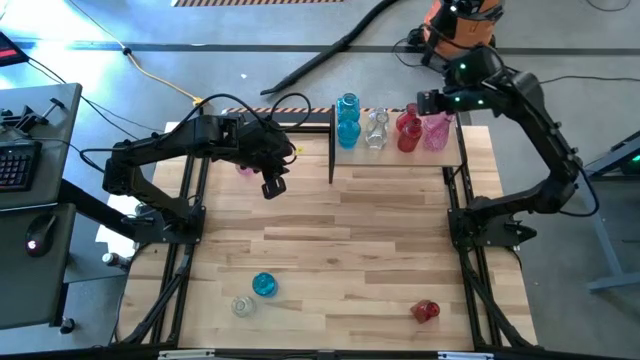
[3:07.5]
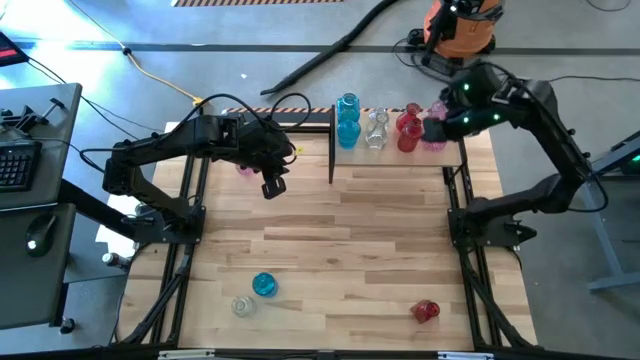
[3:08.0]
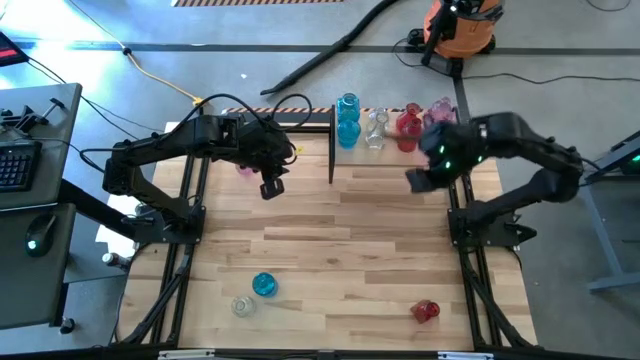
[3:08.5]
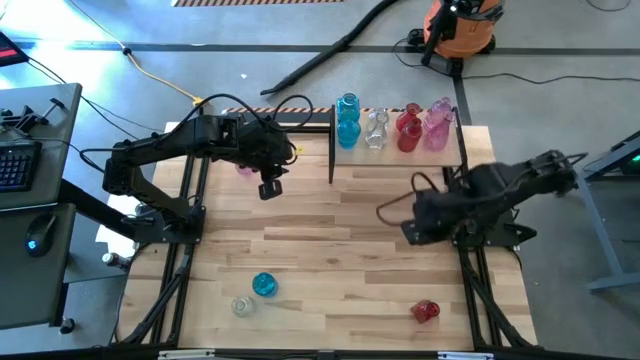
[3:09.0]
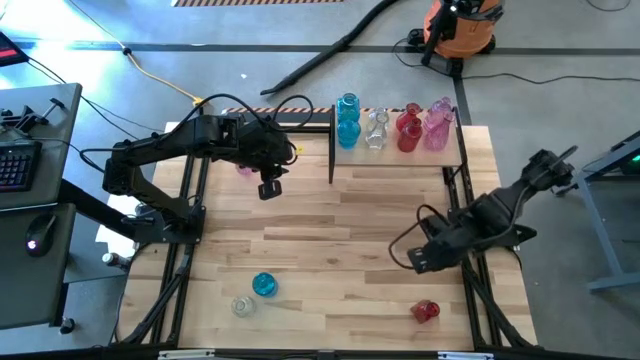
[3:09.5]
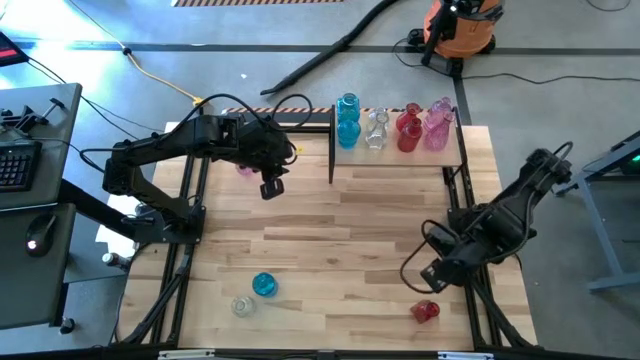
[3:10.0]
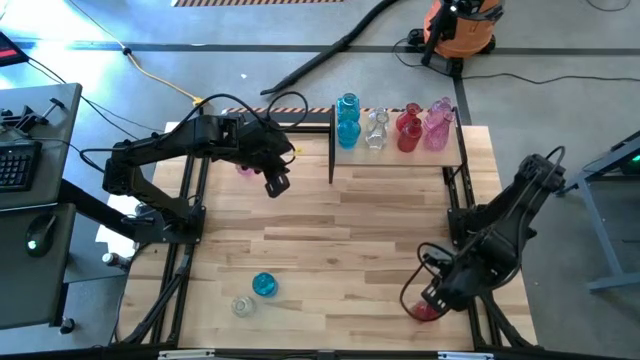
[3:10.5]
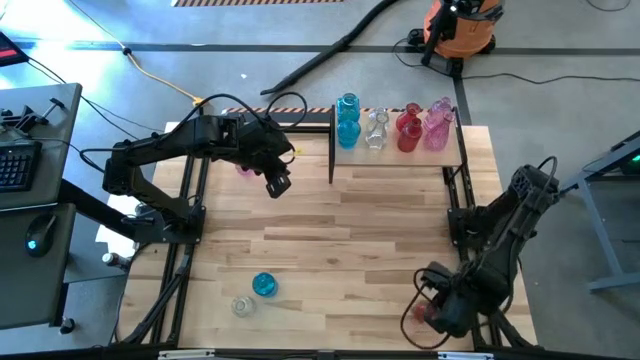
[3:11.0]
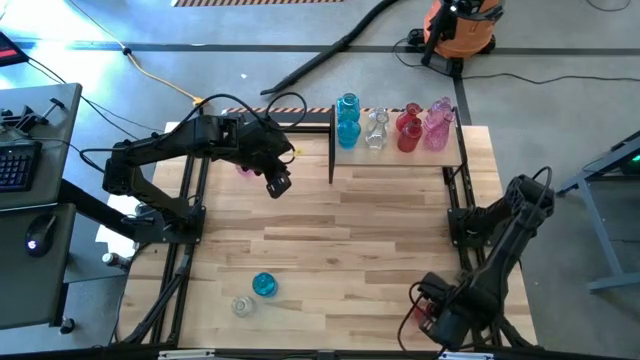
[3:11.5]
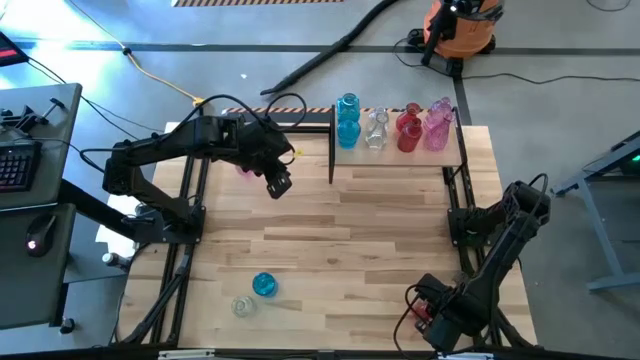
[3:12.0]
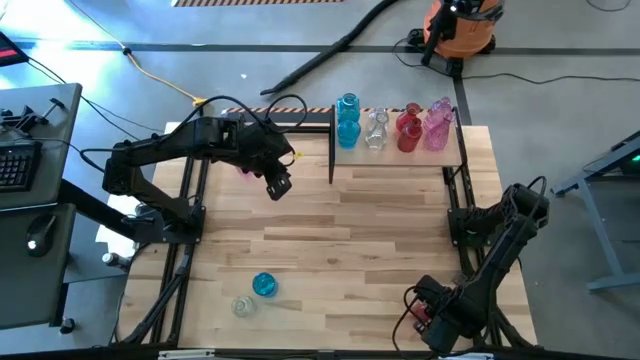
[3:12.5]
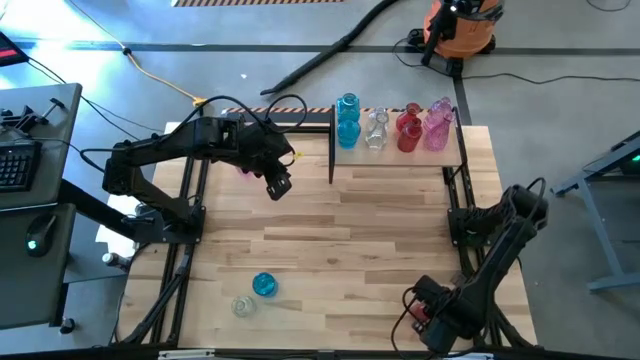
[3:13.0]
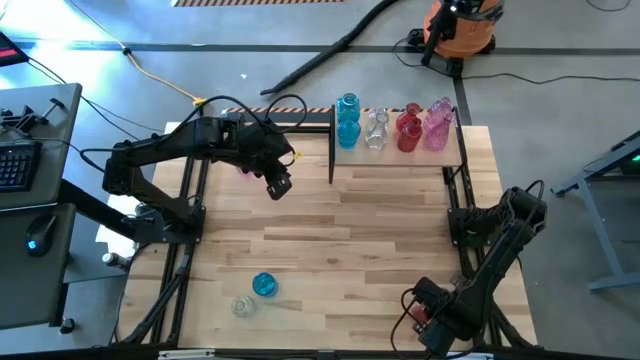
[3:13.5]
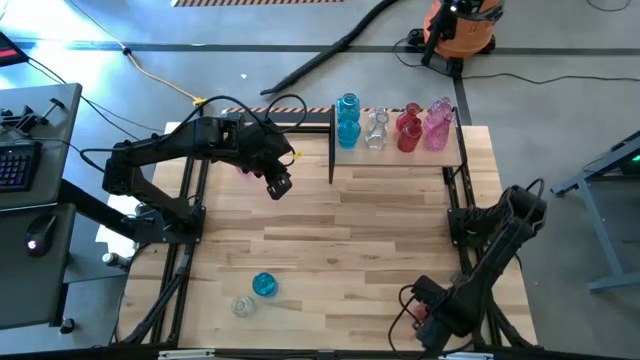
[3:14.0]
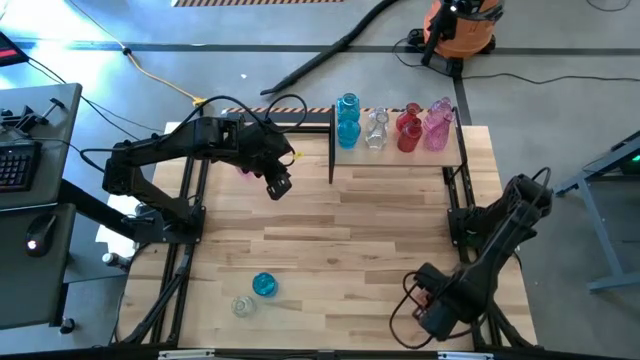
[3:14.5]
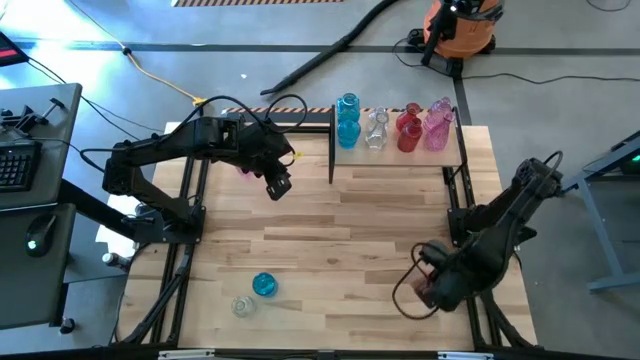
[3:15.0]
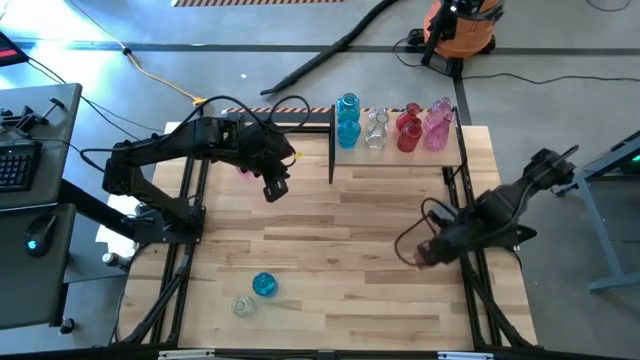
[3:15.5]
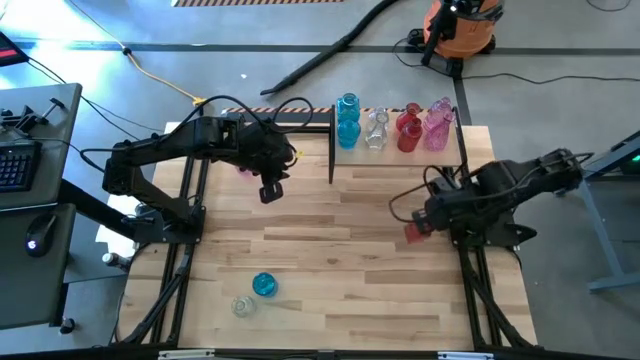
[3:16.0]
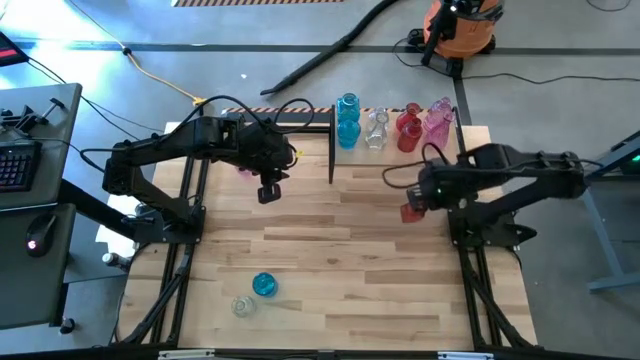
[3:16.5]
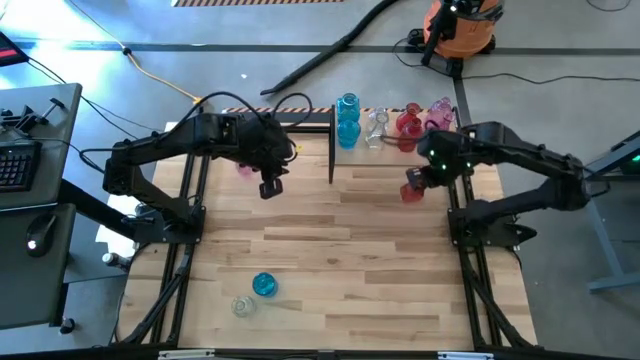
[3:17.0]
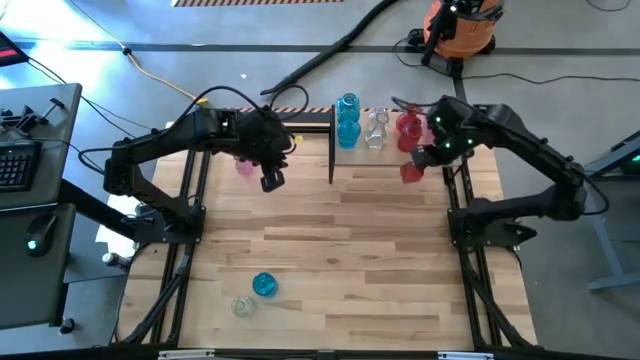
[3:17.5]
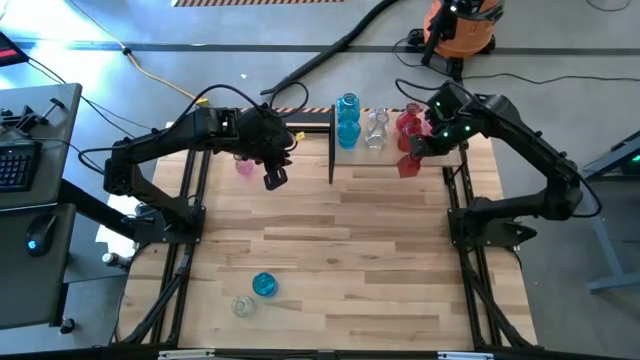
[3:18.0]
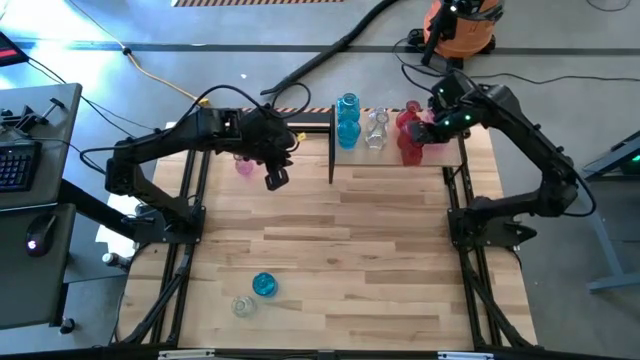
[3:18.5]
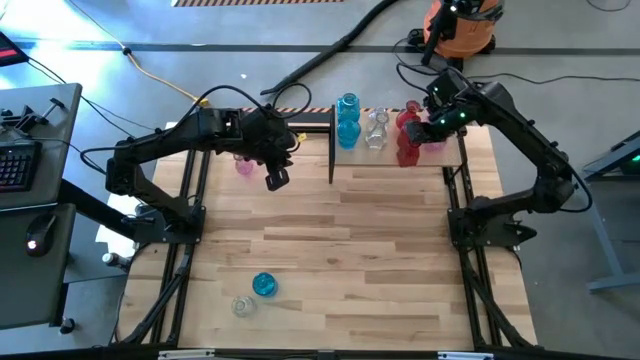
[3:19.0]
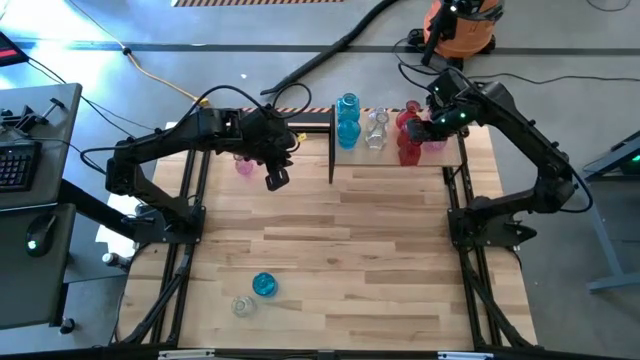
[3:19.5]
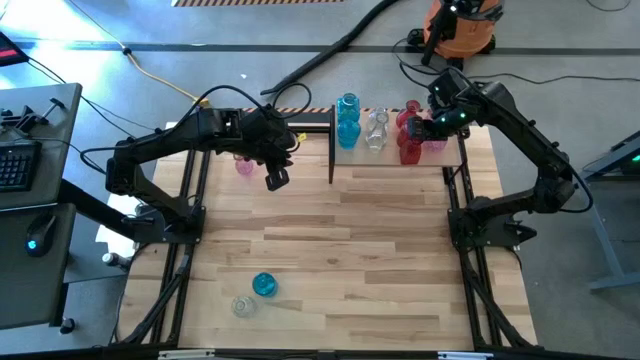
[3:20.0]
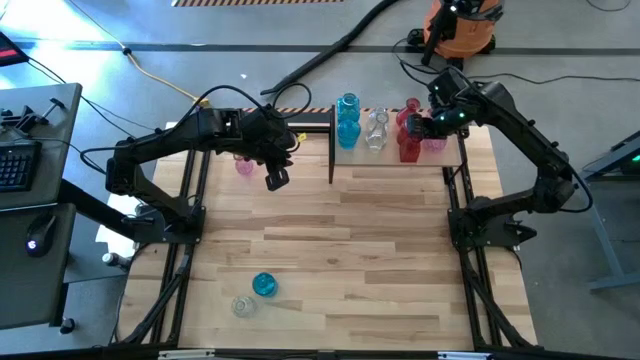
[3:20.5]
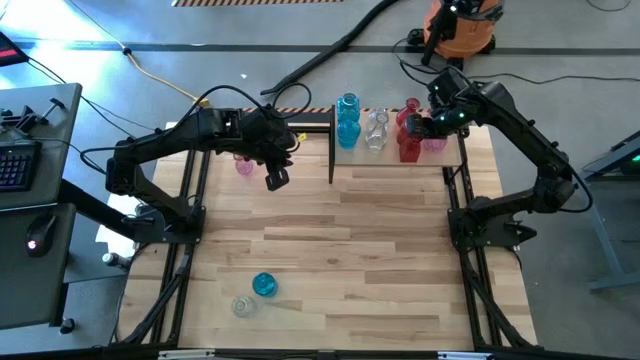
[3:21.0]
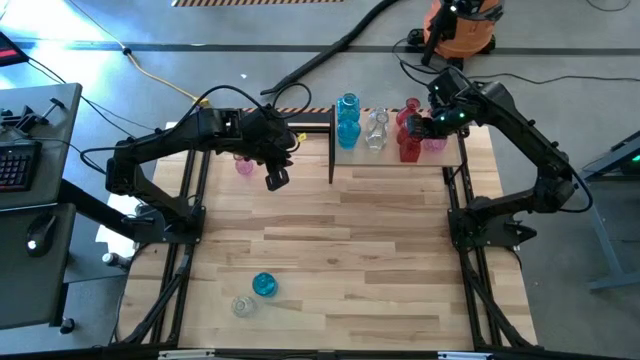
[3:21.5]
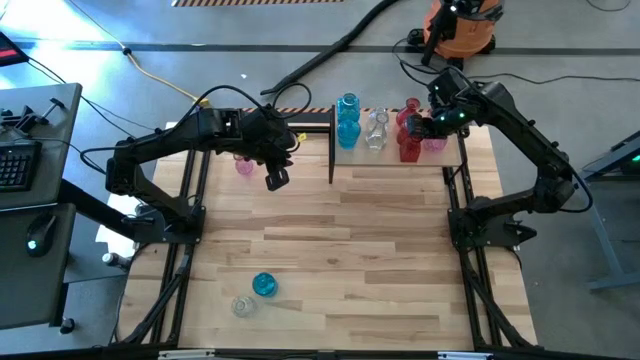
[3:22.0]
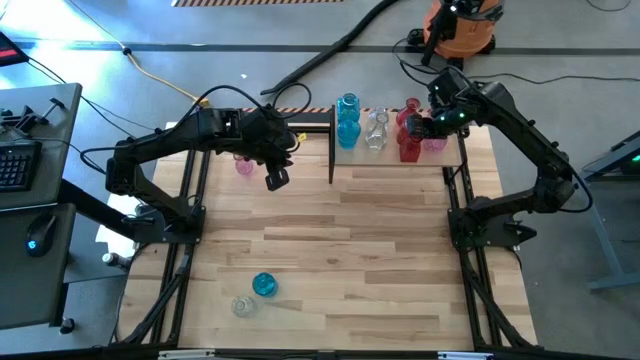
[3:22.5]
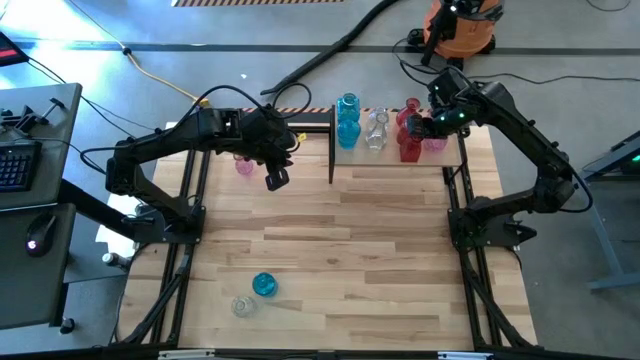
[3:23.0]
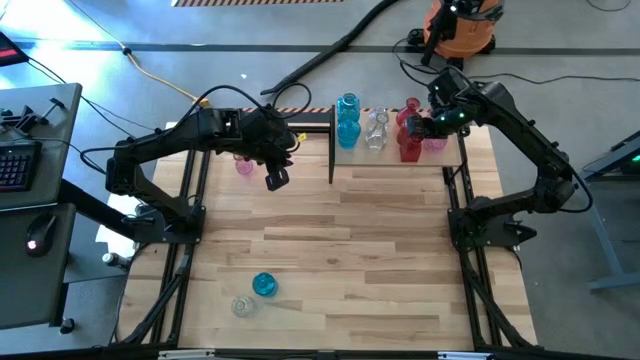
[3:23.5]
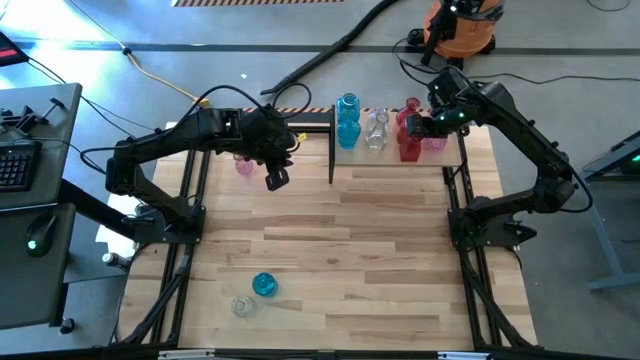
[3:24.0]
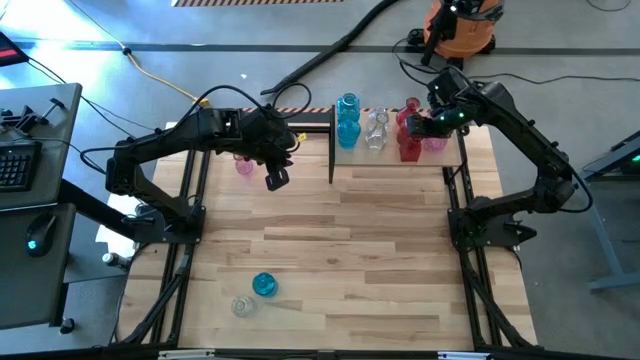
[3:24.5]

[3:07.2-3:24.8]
Task: sort vases onto shelf
Put the red vase on the shelf aligned with the other red vase

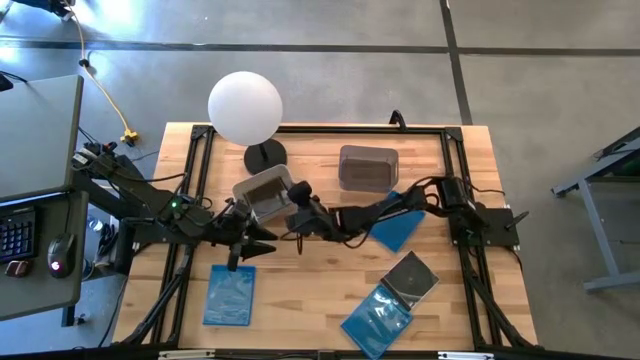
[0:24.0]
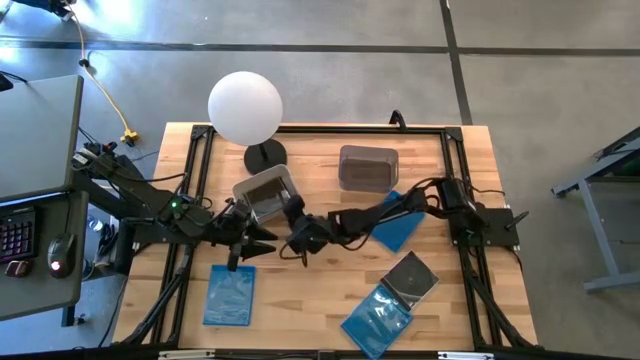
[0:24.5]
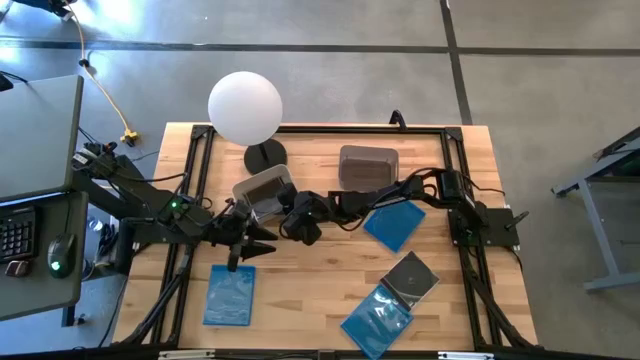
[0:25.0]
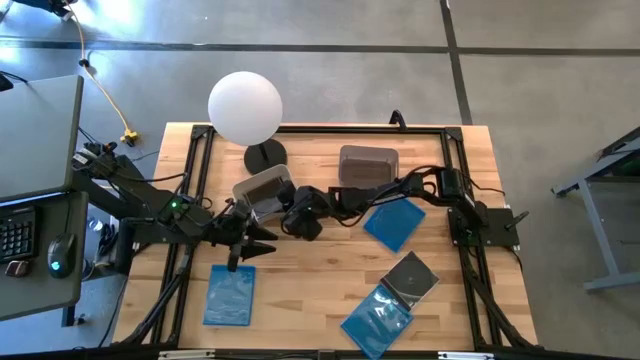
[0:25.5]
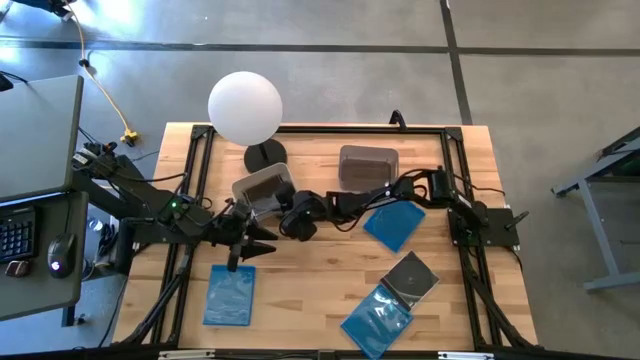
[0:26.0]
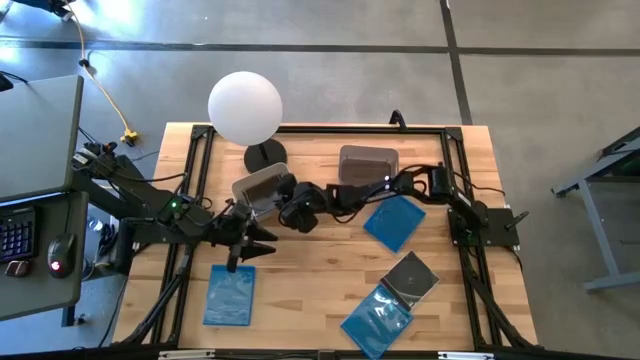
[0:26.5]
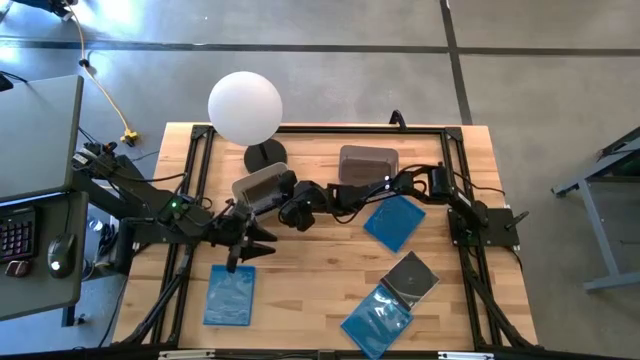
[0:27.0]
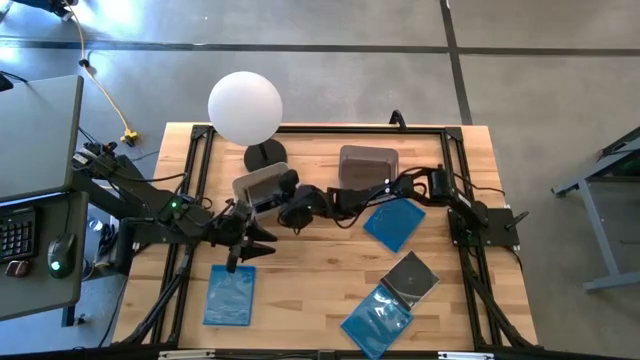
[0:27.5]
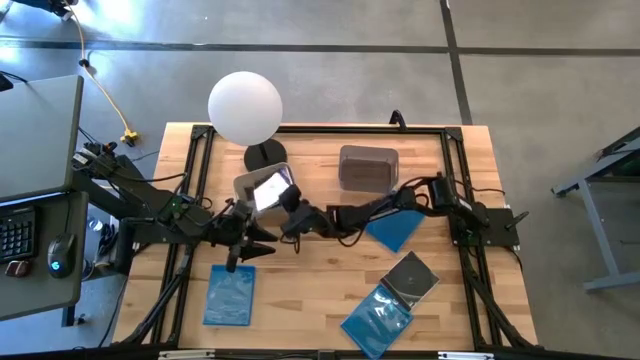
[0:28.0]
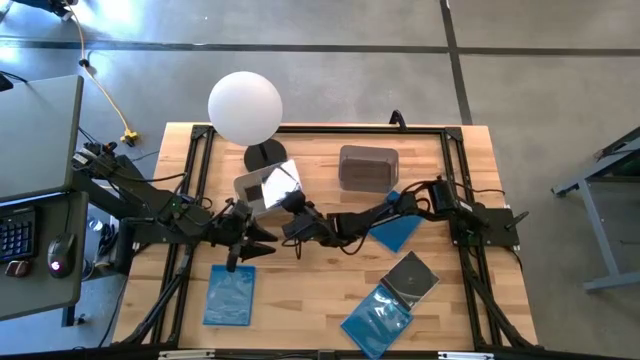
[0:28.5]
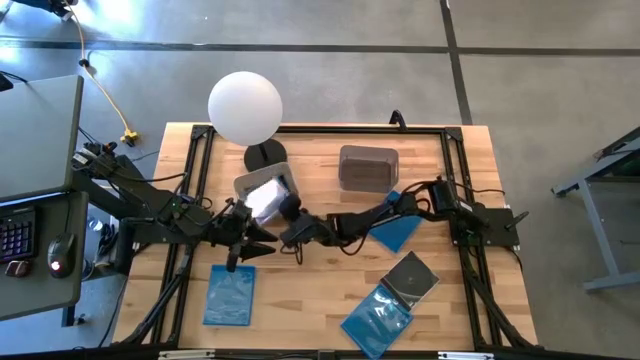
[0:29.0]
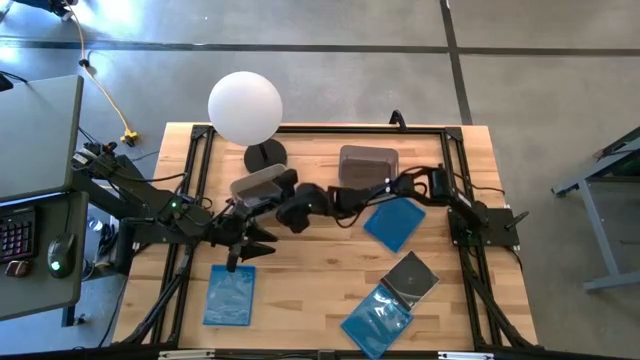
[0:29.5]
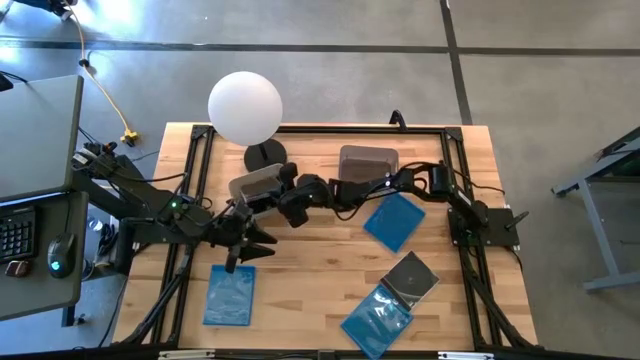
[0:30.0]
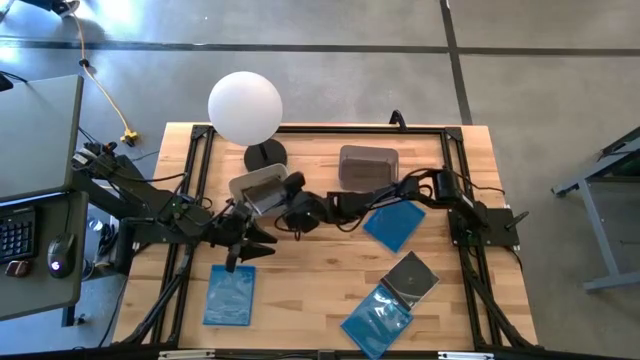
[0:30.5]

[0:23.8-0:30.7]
Task: Pick & place jewel cases by type
Put the left black CD case into the gray bin
